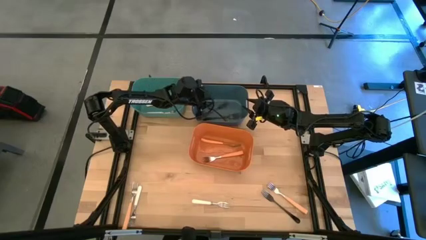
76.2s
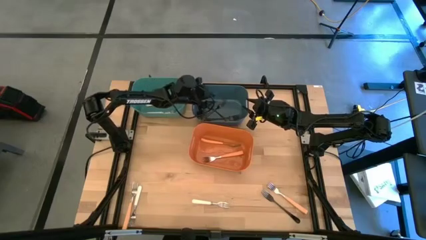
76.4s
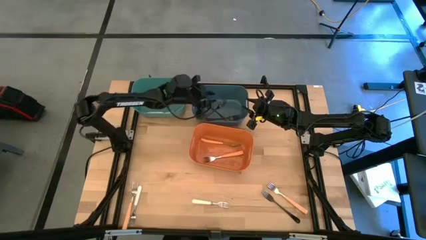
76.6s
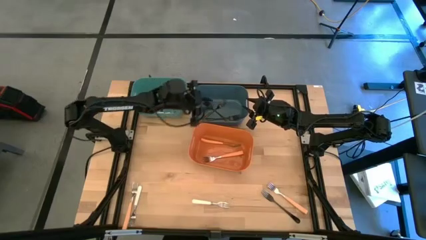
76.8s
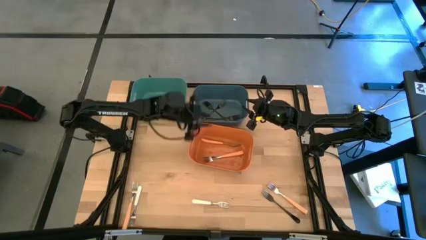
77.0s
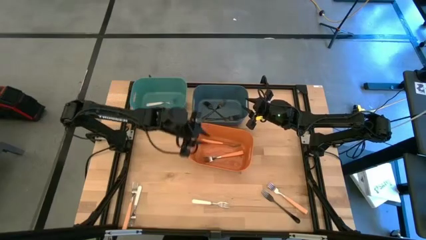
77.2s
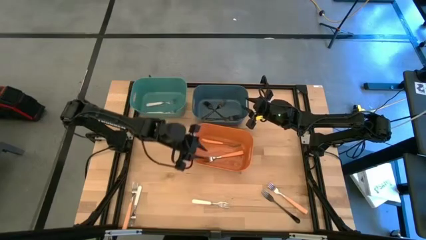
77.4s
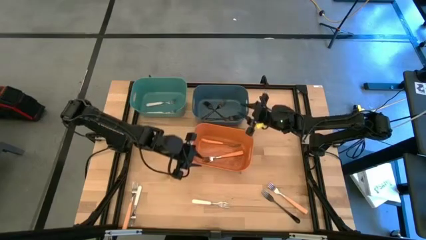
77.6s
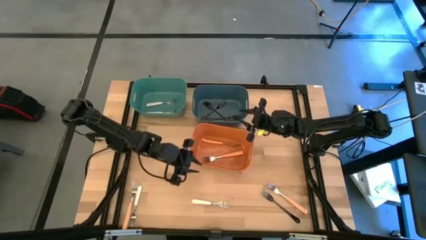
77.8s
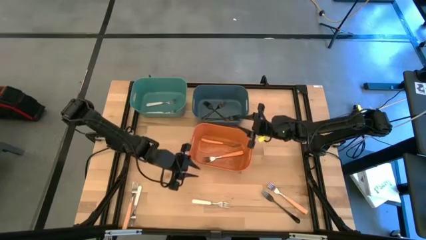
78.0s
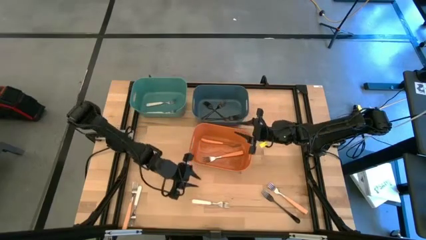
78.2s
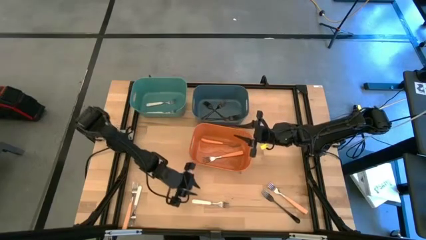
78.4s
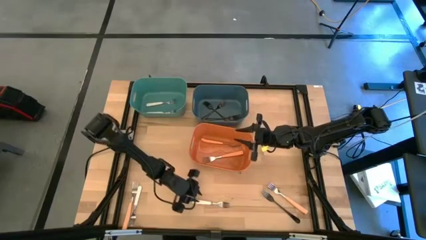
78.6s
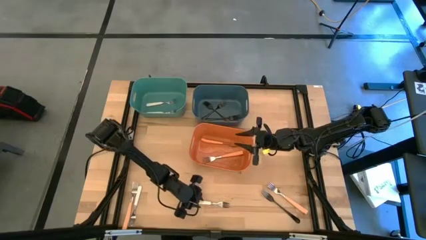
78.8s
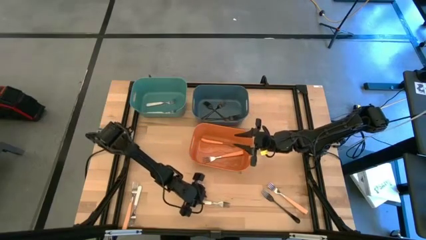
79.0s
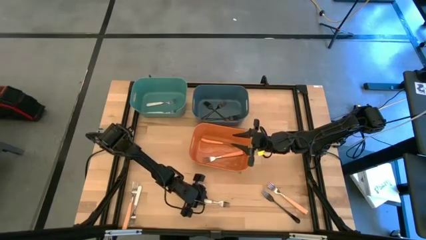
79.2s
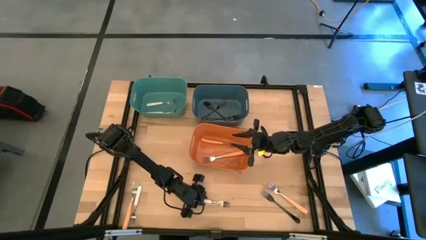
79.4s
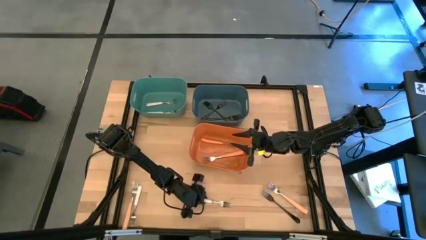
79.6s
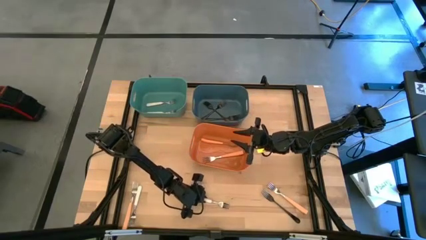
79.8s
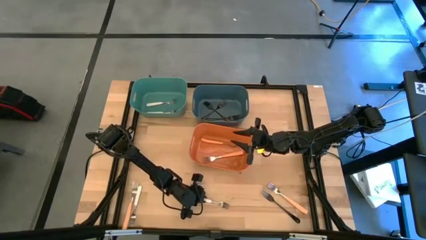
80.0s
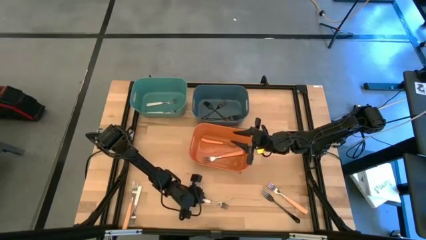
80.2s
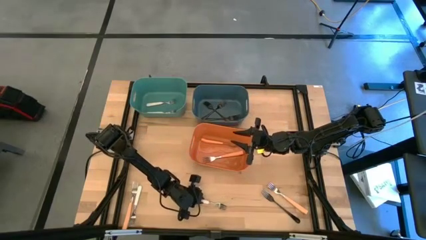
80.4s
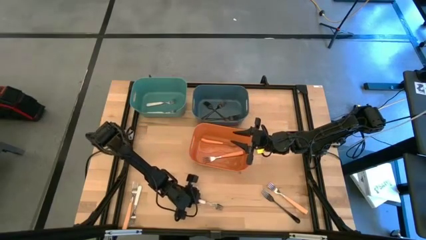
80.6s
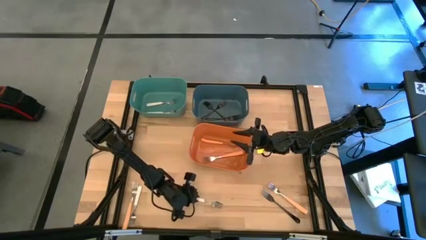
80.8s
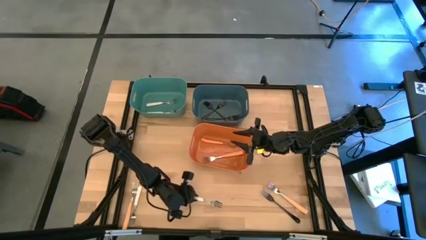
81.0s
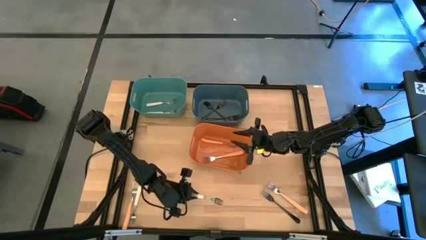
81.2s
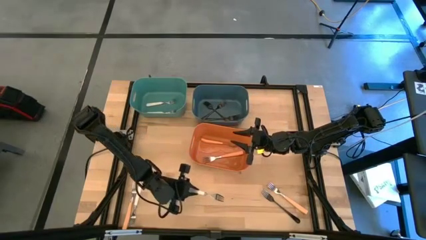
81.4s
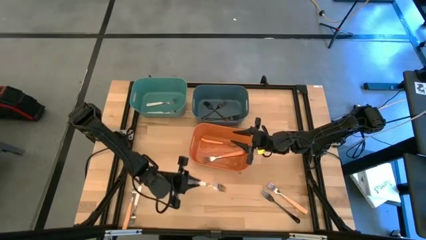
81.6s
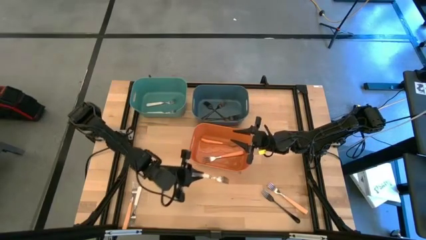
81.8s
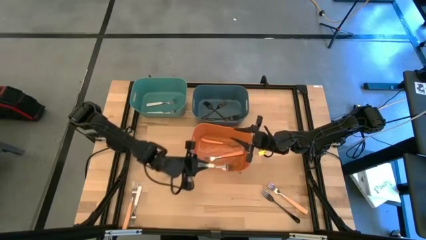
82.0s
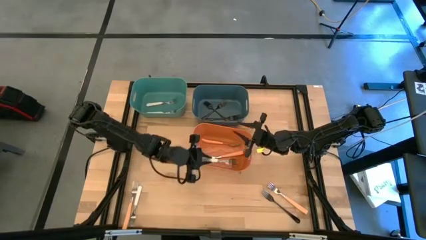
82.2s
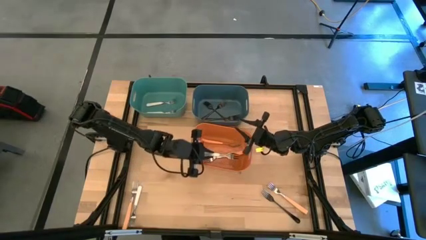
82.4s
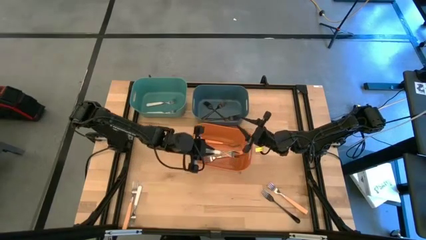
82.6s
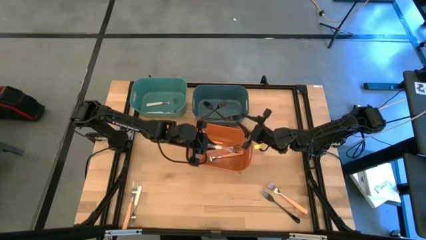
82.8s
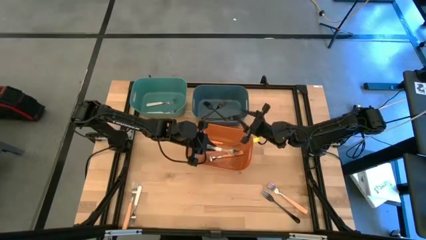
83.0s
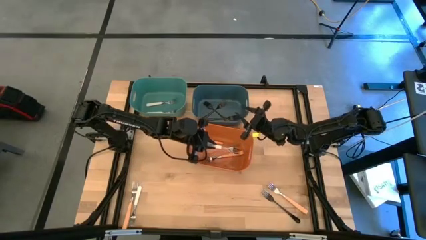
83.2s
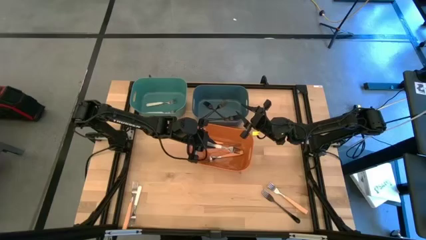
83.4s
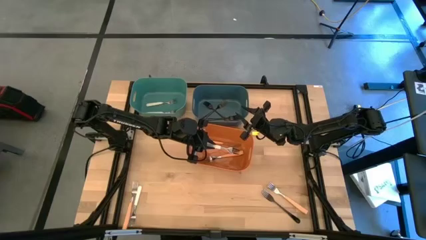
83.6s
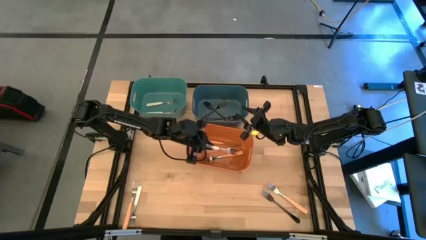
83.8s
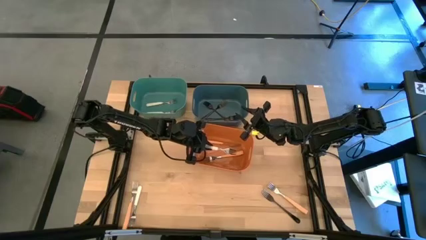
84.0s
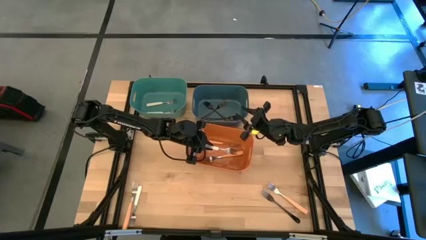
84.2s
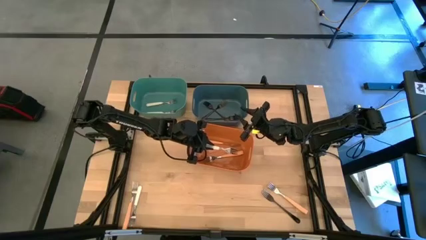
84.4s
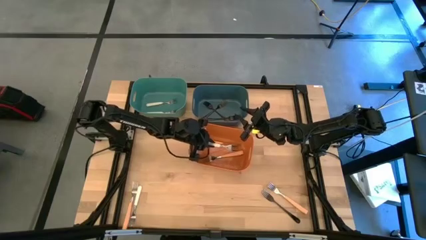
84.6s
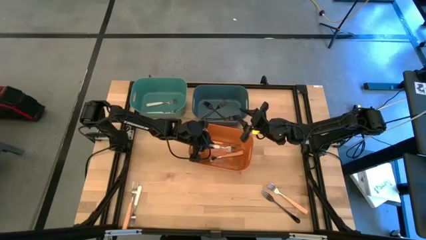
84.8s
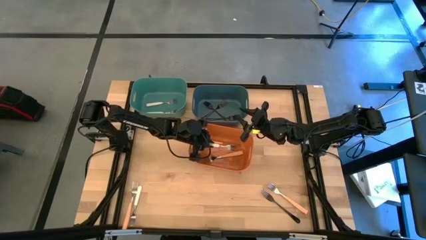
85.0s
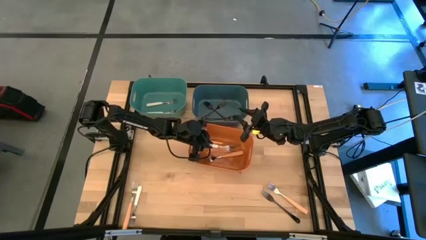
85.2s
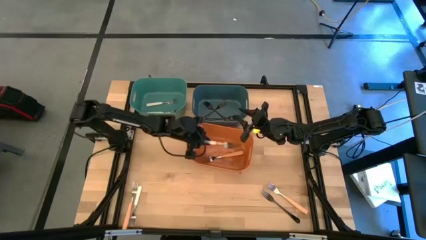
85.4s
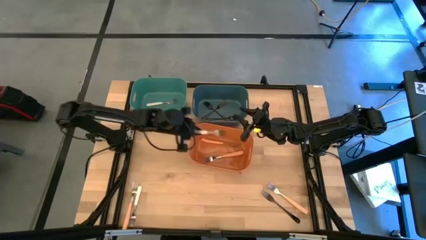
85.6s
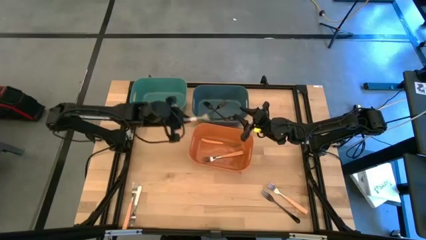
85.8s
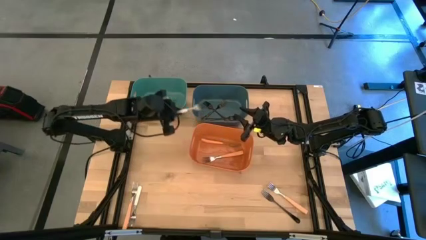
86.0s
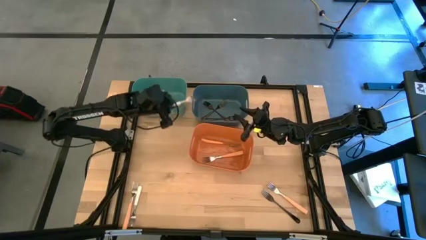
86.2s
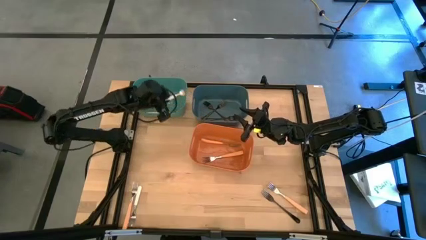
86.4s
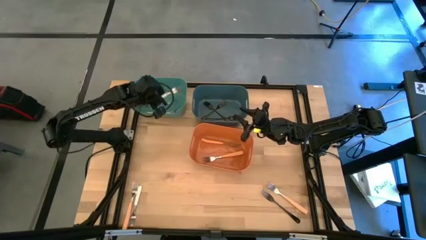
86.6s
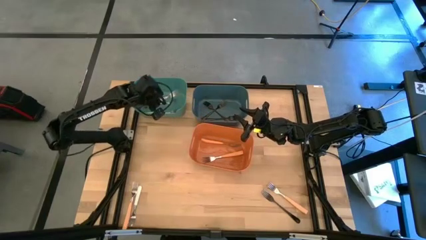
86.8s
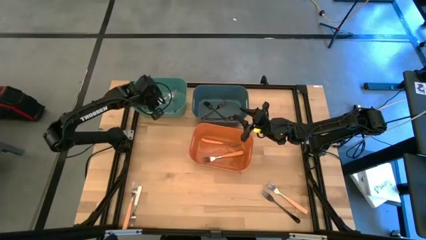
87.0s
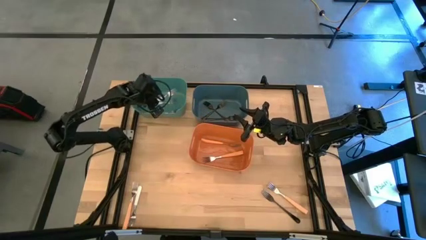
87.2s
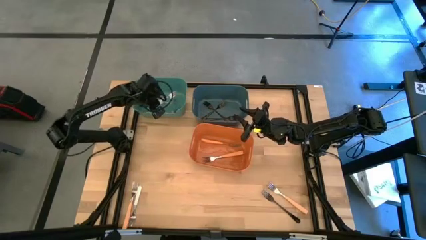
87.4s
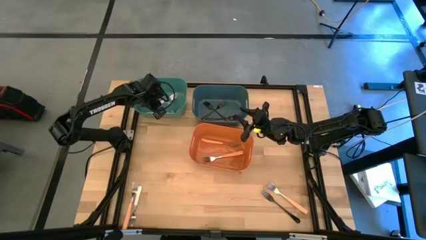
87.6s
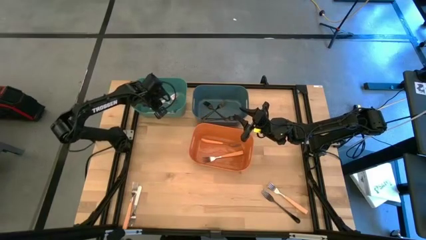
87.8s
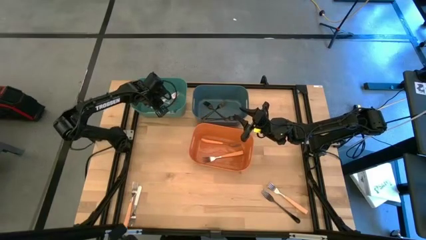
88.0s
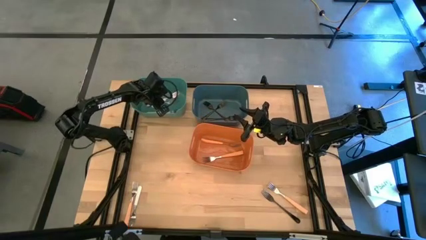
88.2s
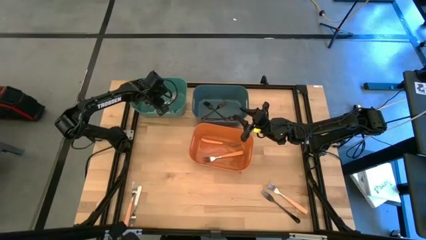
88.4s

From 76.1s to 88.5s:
Task: Sort silverware by color (type)
Put the white fork into the green bin

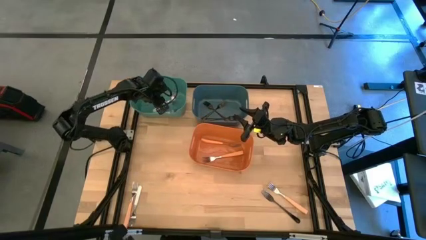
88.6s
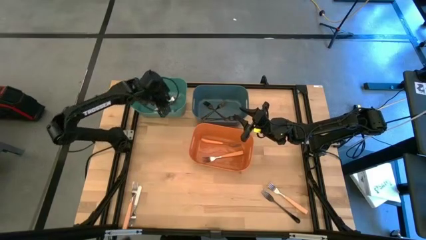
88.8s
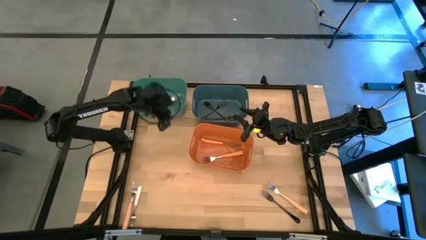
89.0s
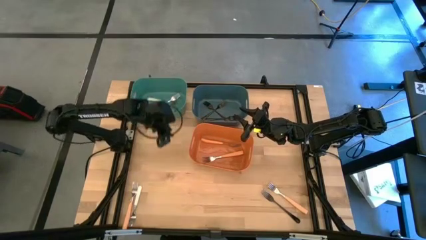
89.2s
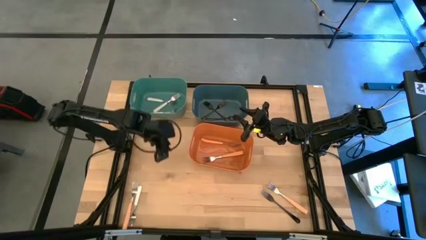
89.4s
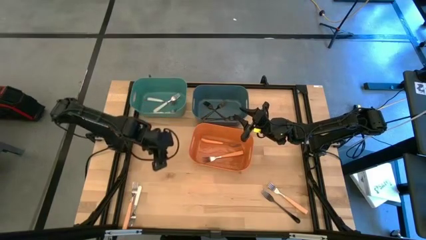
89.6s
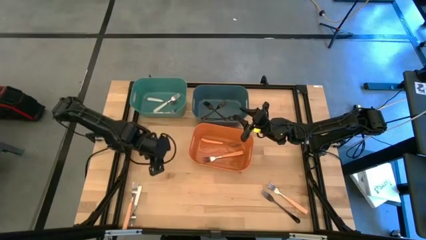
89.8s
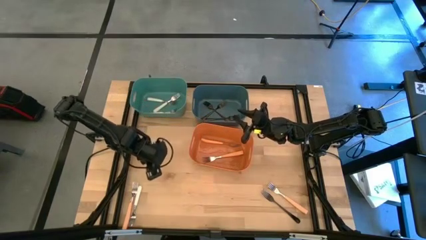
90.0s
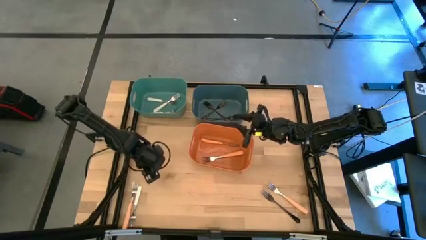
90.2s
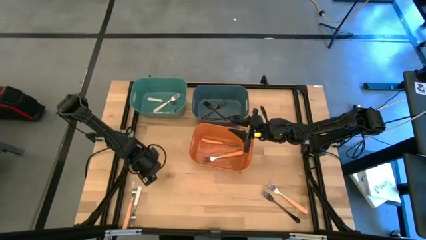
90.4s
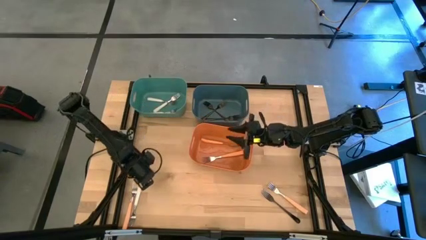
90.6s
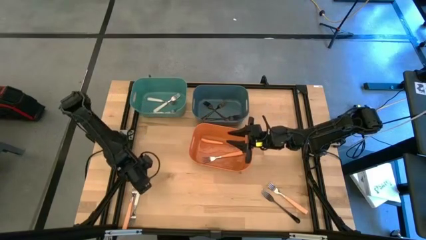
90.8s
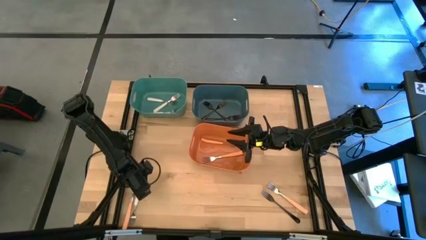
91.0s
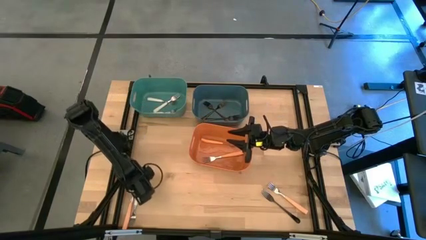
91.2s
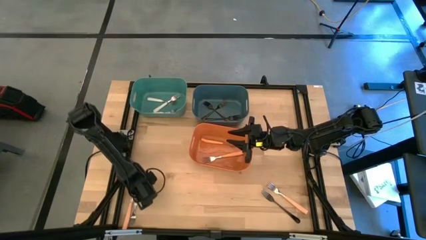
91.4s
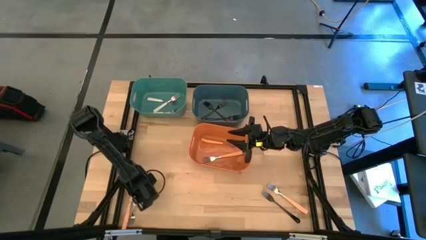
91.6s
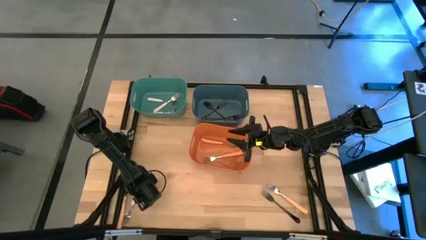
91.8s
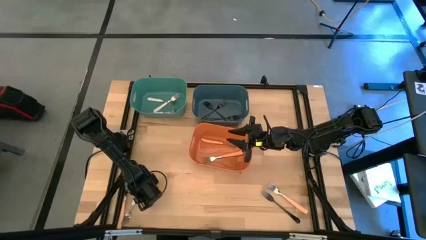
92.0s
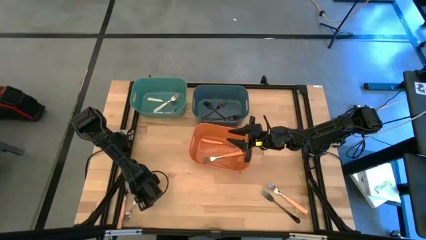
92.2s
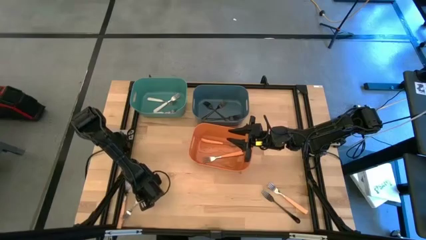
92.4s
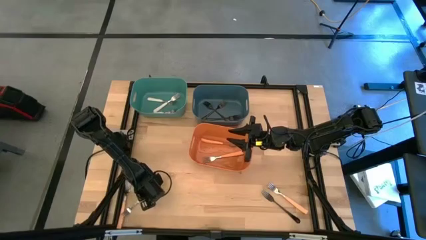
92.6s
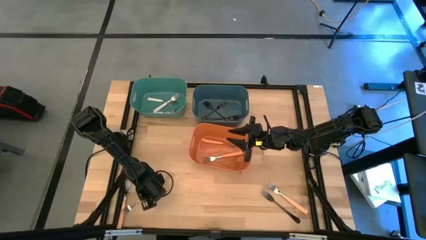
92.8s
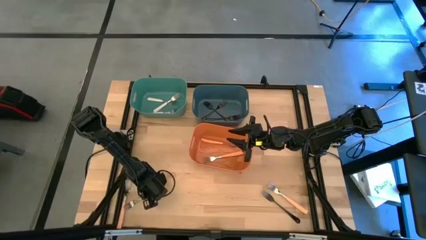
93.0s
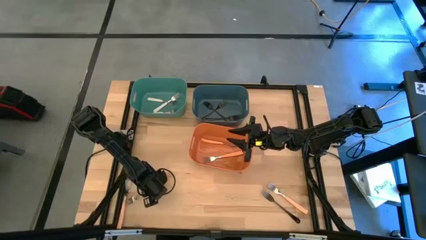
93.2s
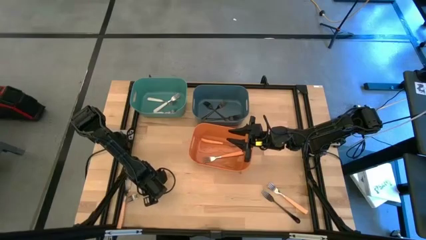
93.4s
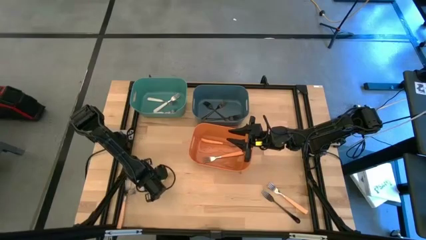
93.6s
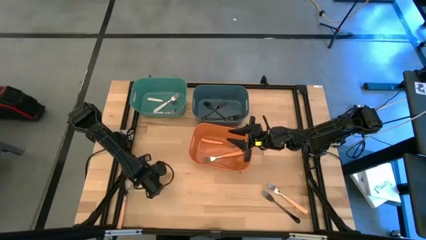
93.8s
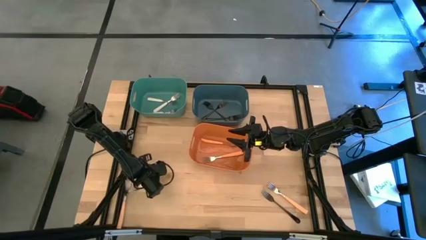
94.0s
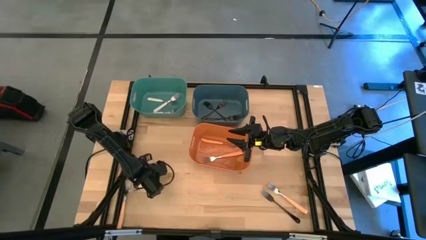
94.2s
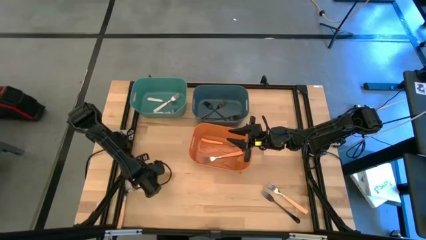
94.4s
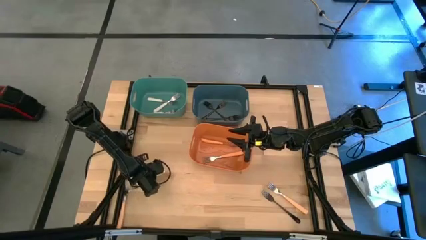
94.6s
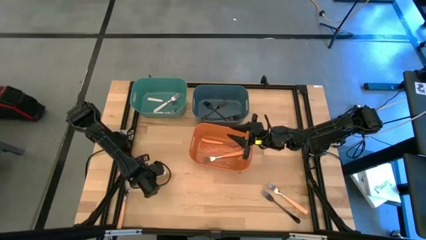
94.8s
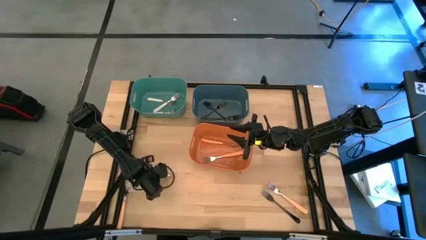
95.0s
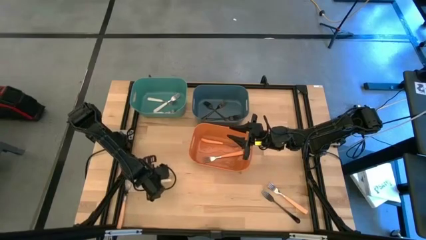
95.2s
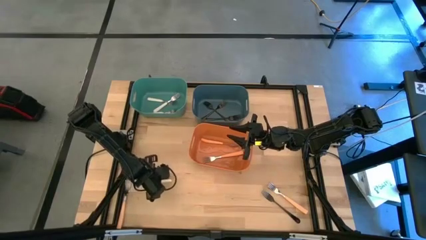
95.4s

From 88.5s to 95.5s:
Put the white fork into the green bin
